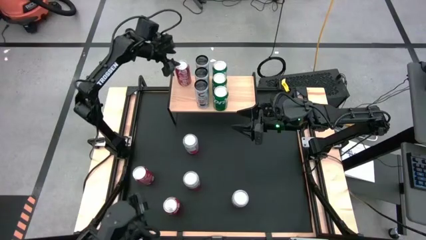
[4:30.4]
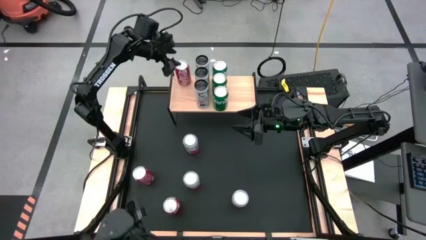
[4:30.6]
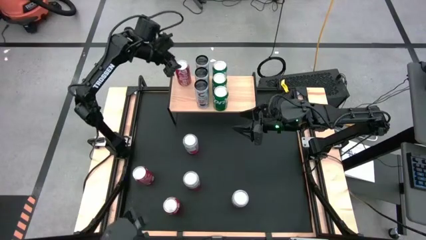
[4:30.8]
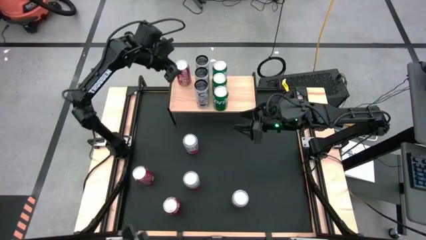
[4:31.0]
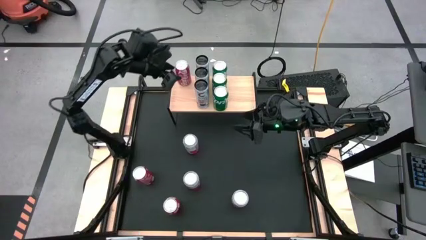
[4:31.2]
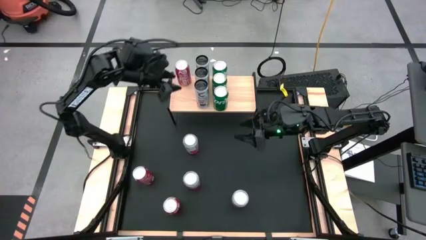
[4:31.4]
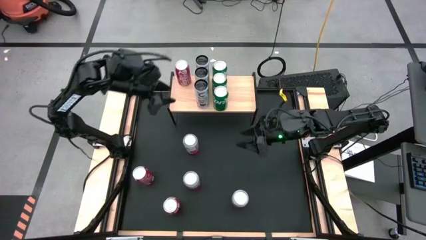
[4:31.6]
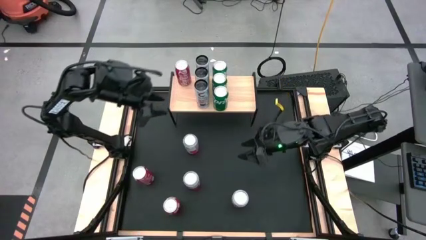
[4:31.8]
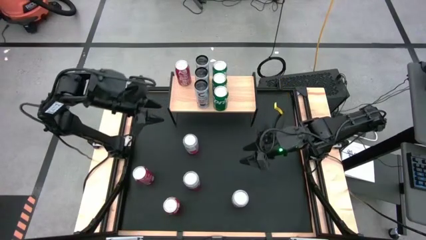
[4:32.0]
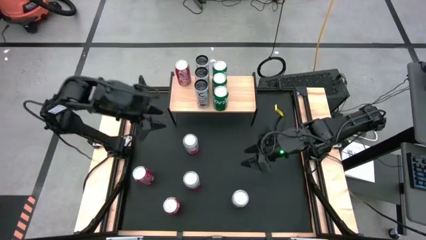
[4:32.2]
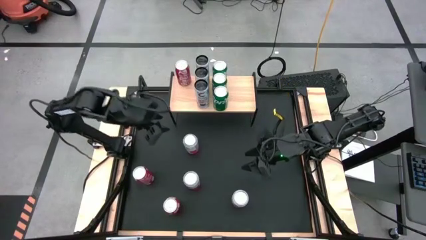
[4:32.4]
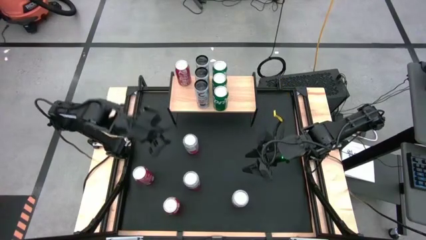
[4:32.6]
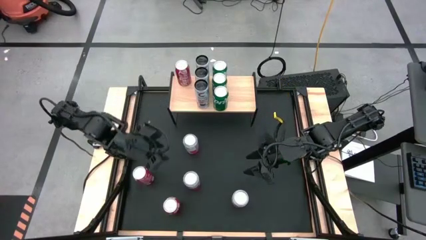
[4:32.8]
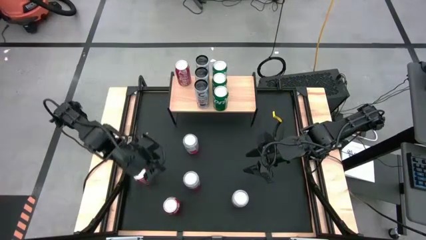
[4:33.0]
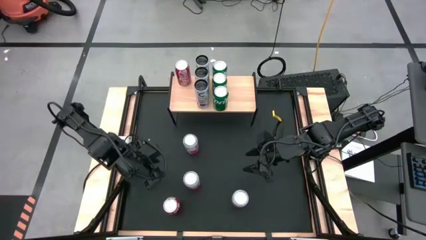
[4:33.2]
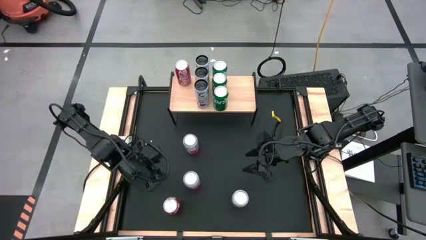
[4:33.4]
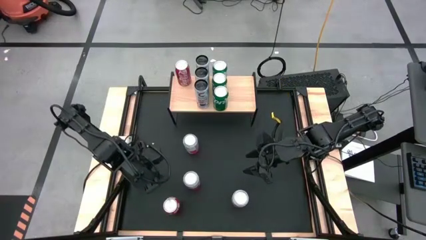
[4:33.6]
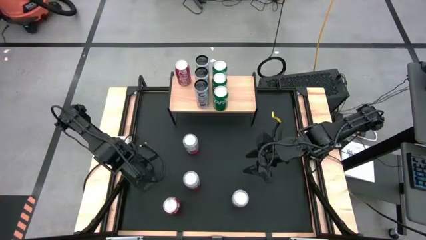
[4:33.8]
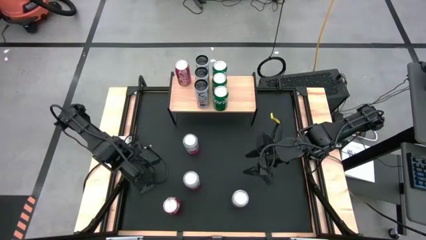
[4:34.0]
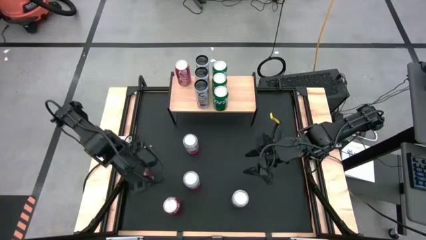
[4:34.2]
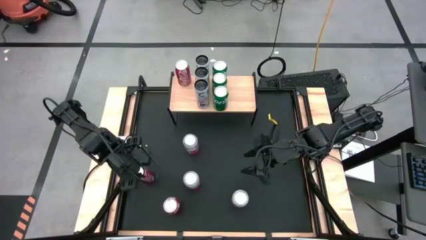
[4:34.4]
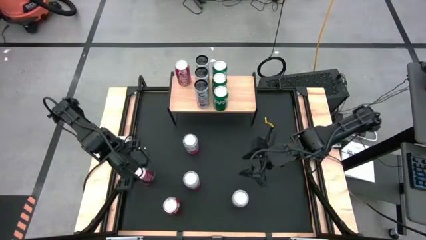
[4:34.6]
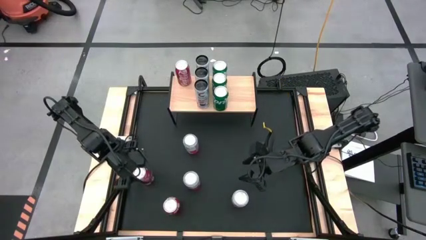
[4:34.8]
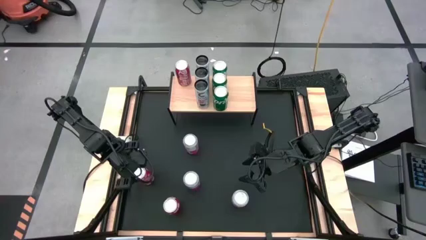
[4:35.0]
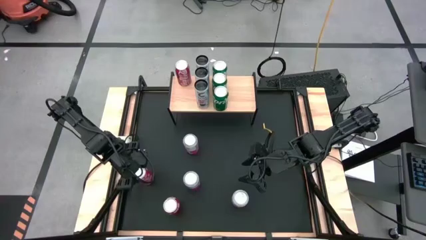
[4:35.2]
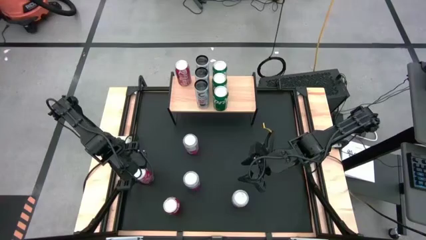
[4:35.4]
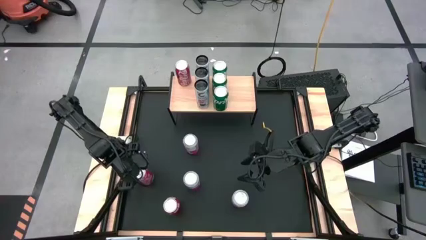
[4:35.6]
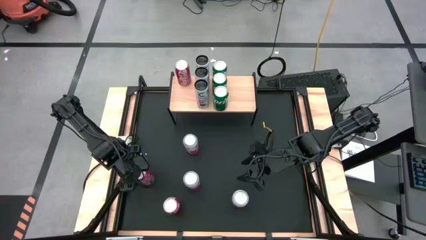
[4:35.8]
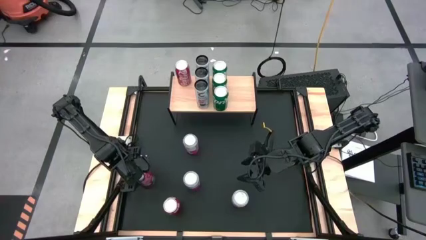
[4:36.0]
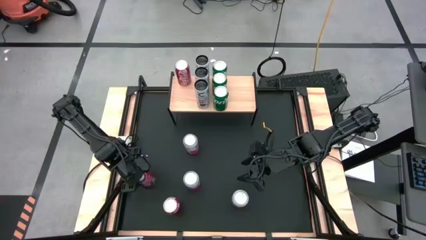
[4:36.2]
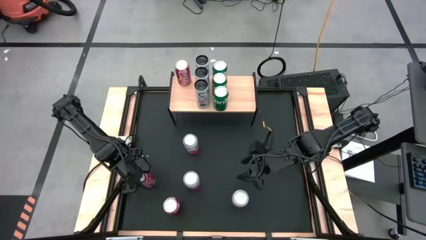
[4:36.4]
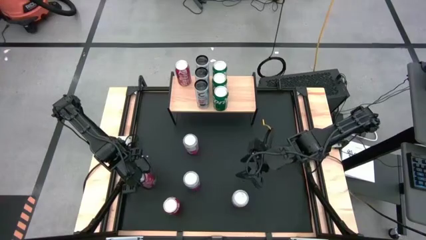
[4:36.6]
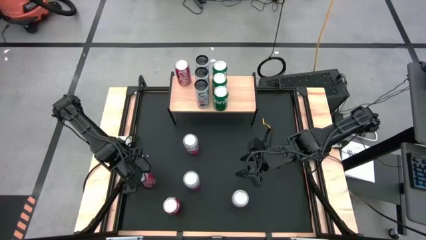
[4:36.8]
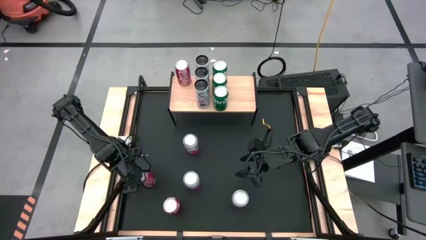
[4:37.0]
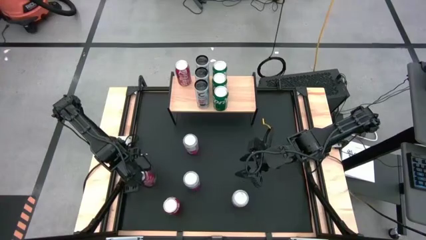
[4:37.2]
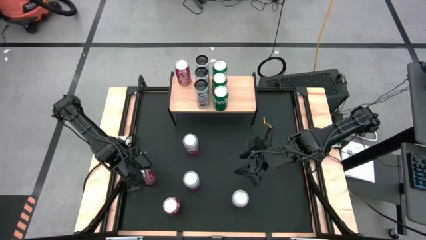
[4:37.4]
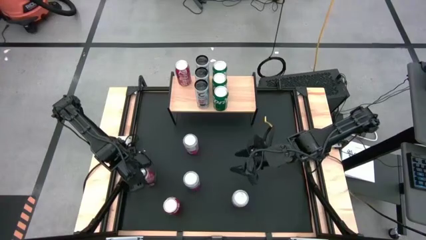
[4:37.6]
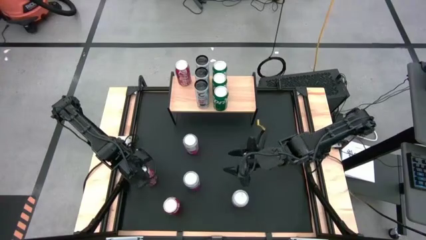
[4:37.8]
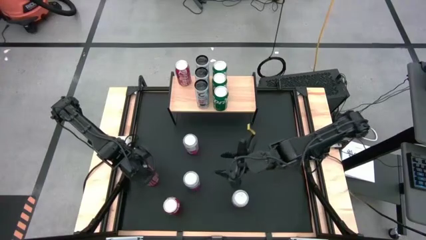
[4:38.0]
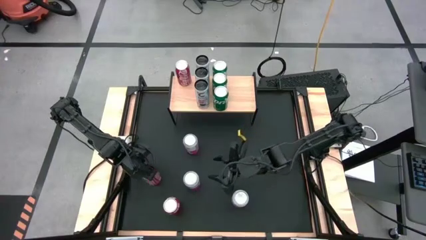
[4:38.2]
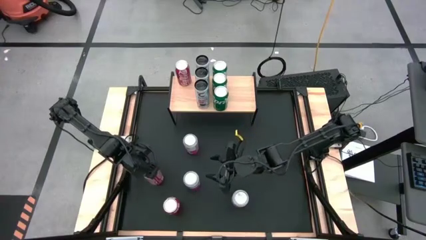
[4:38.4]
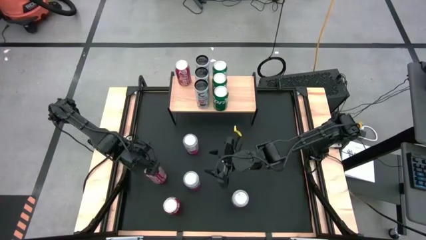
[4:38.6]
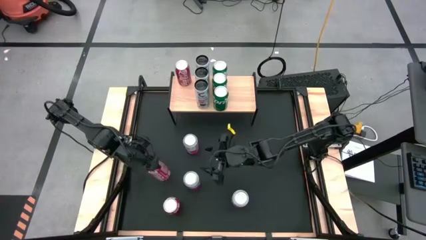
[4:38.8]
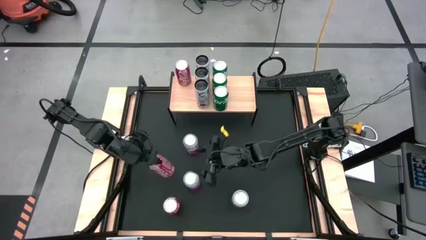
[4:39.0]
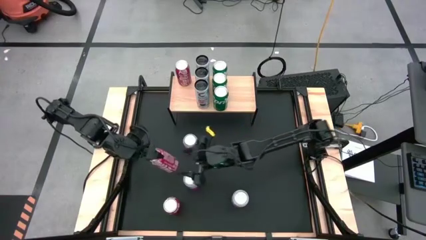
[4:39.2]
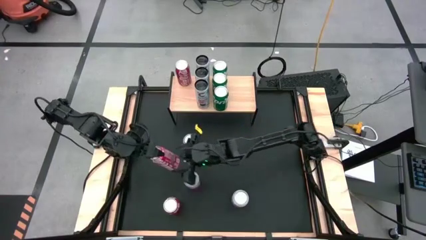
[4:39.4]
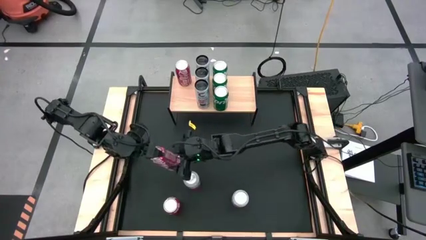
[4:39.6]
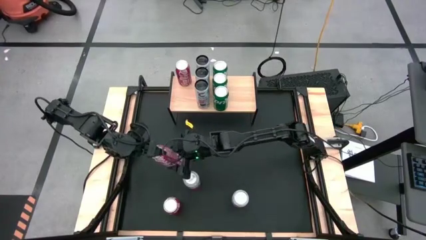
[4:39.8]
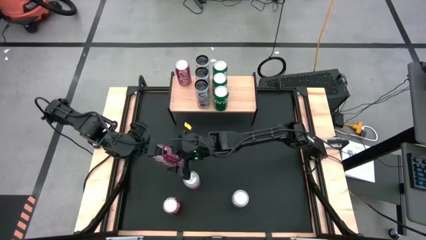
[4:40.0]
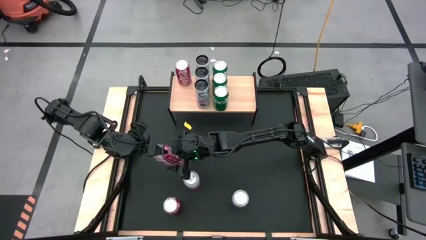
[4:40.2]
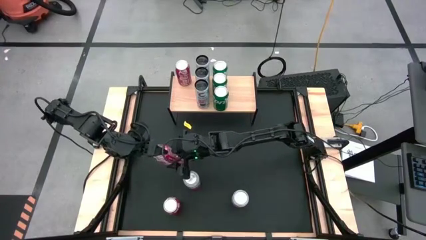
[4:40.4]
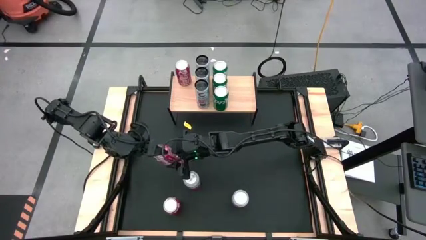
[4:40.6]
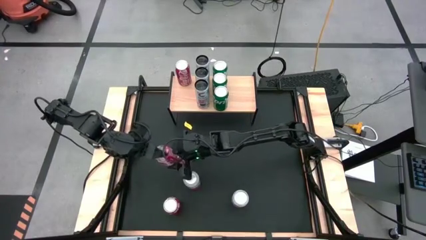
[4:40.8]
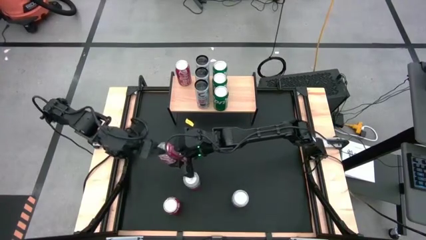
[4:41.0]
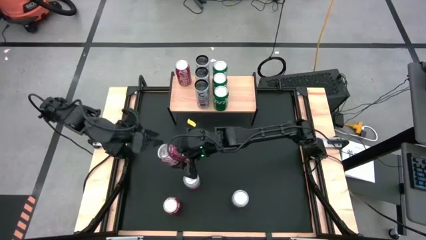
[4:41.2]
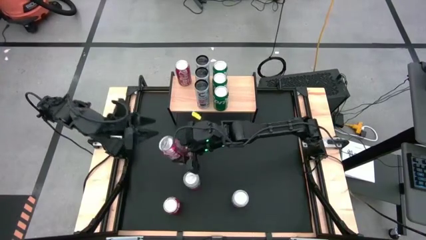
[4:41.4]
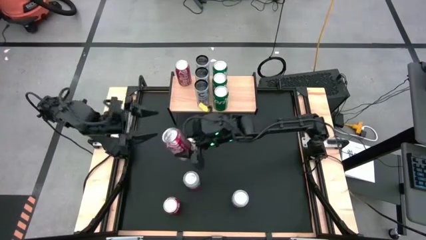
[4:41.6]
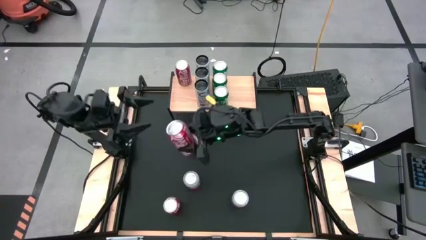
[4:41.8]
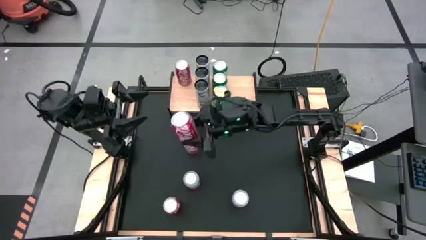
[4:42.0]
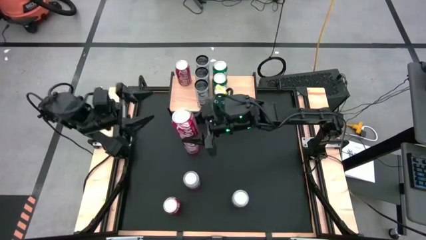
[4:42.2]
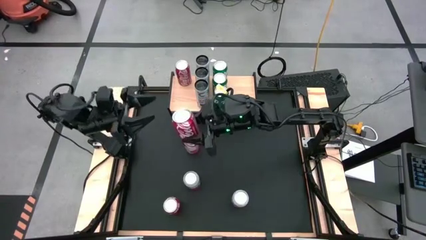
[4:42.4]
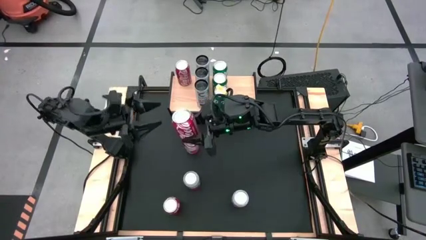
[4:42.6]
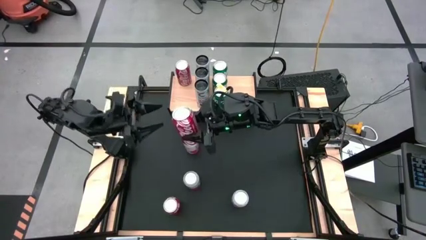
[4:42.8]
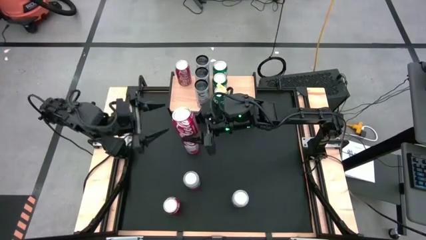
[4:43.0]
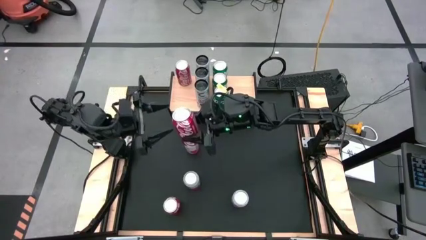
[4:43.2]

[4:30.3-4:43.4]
Task: Place canned beverage on shelf
Put the top red soda can aligned with the other red soda can on the shelf
